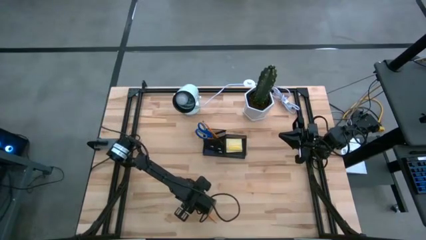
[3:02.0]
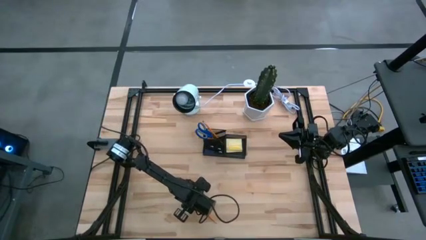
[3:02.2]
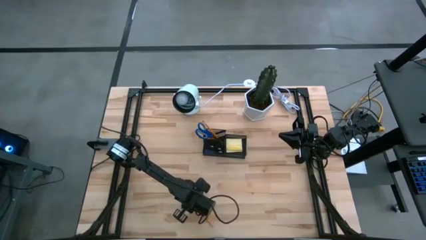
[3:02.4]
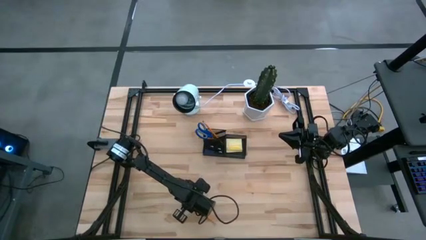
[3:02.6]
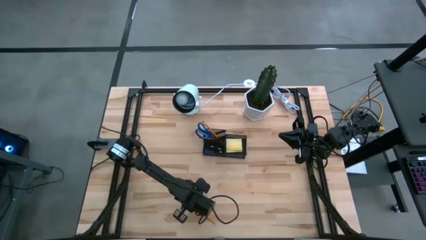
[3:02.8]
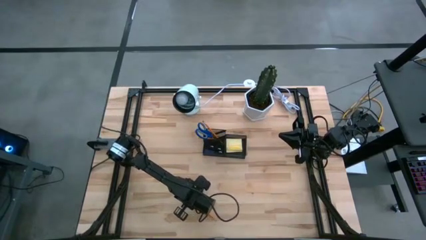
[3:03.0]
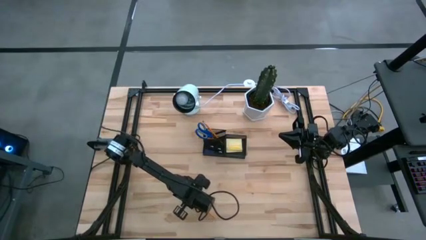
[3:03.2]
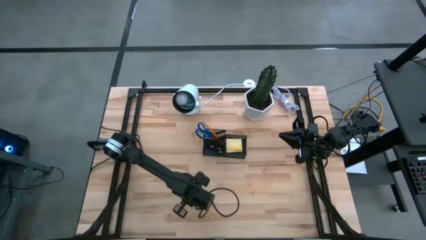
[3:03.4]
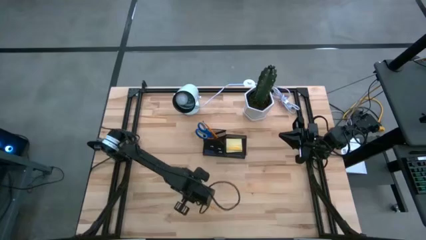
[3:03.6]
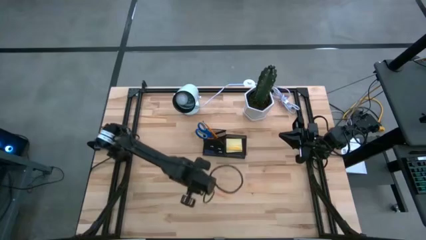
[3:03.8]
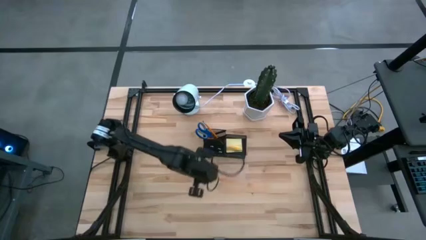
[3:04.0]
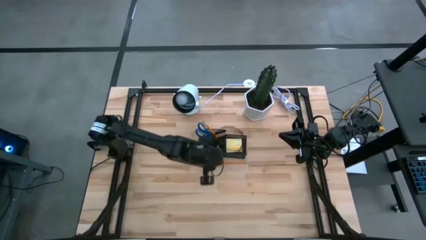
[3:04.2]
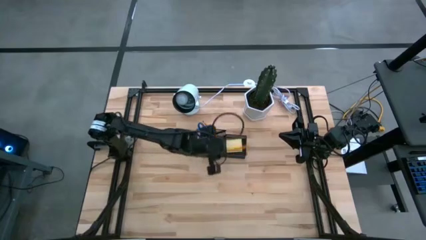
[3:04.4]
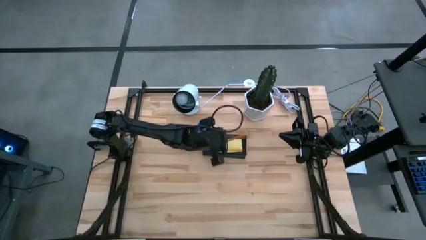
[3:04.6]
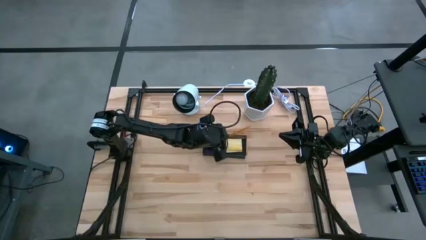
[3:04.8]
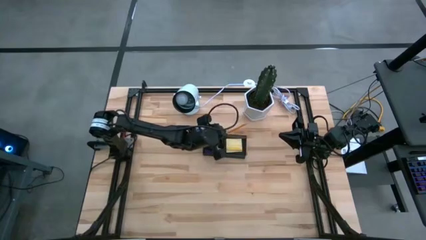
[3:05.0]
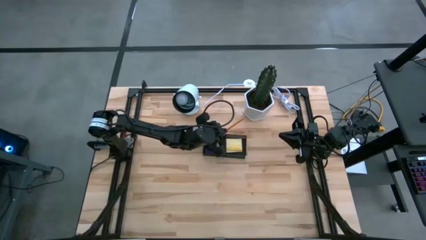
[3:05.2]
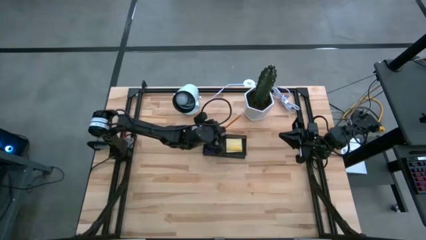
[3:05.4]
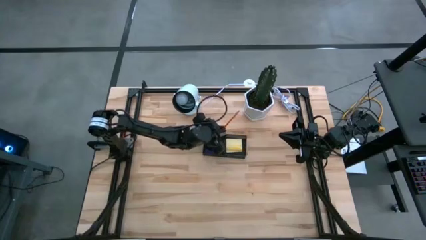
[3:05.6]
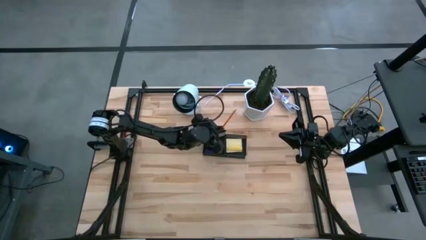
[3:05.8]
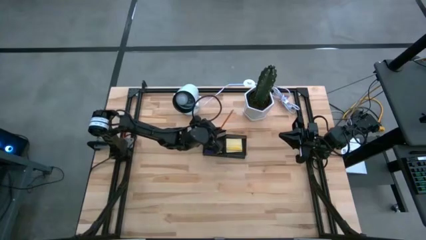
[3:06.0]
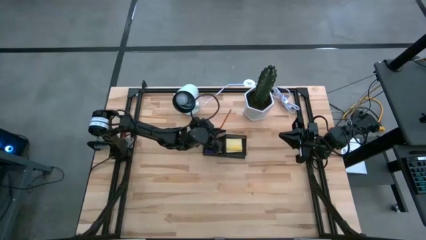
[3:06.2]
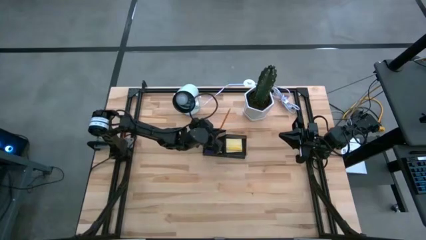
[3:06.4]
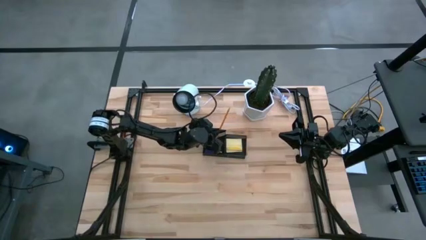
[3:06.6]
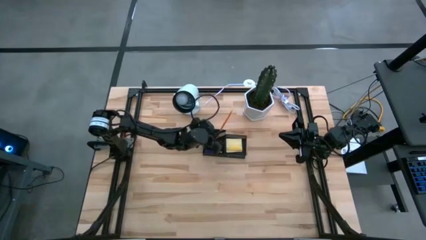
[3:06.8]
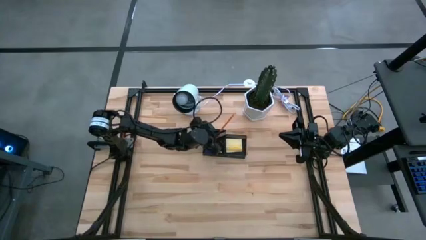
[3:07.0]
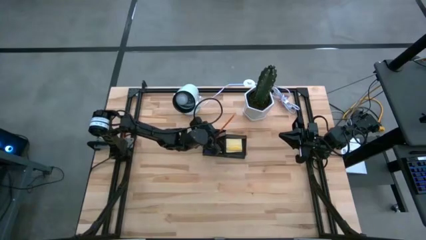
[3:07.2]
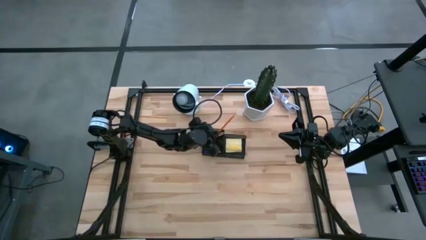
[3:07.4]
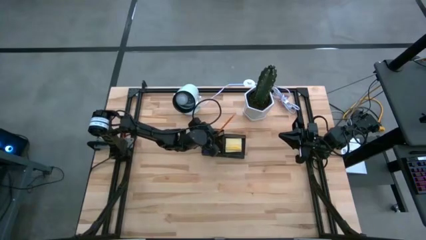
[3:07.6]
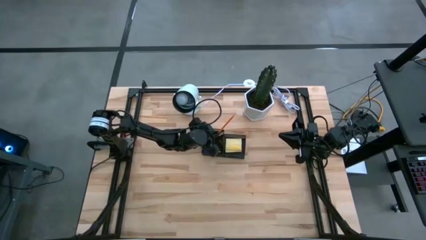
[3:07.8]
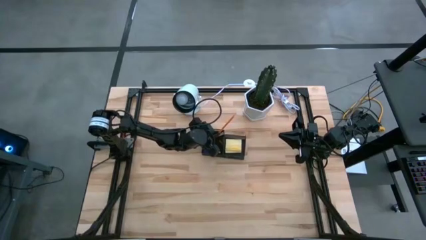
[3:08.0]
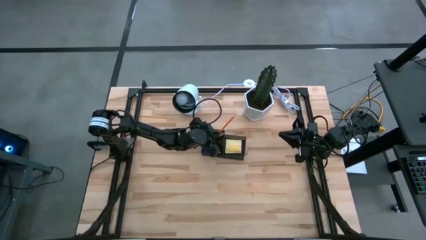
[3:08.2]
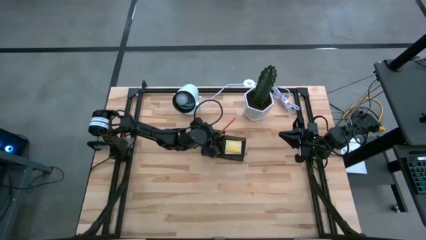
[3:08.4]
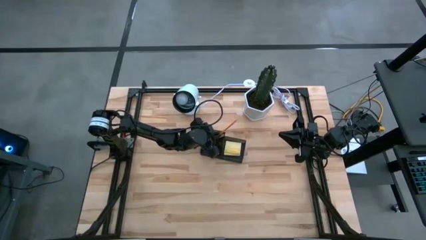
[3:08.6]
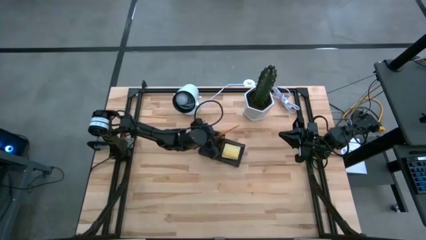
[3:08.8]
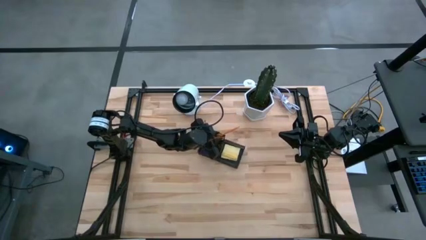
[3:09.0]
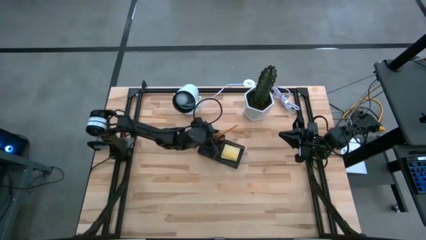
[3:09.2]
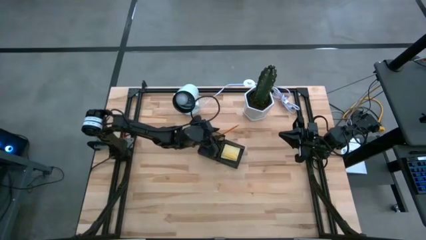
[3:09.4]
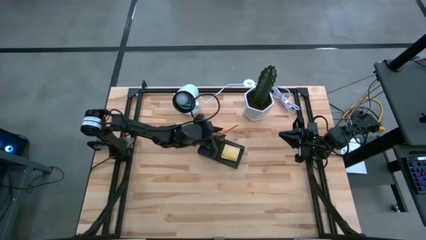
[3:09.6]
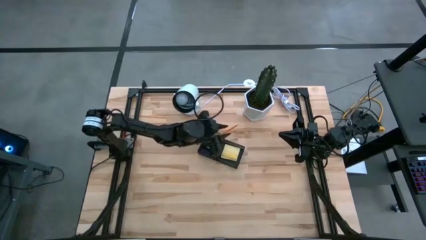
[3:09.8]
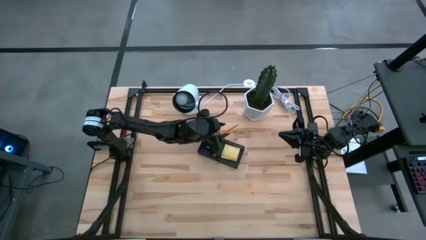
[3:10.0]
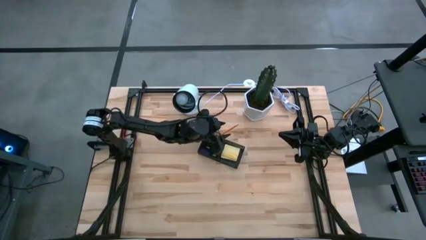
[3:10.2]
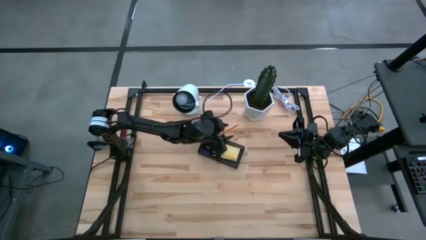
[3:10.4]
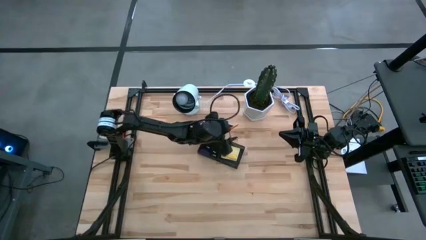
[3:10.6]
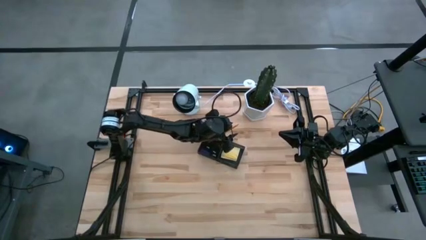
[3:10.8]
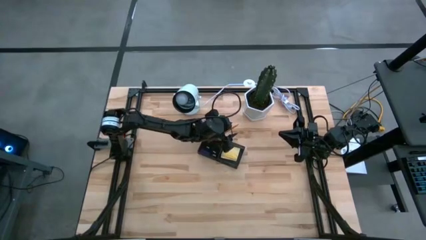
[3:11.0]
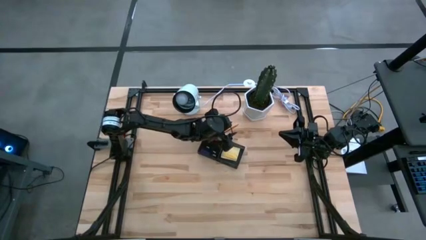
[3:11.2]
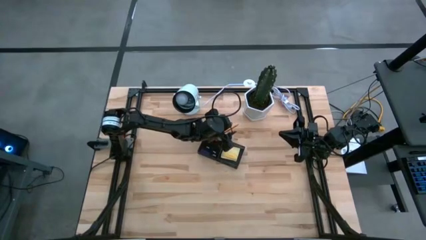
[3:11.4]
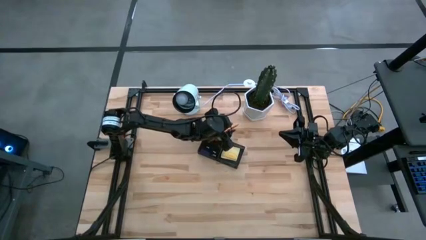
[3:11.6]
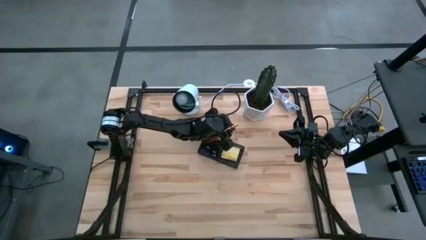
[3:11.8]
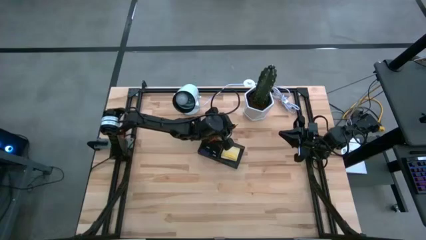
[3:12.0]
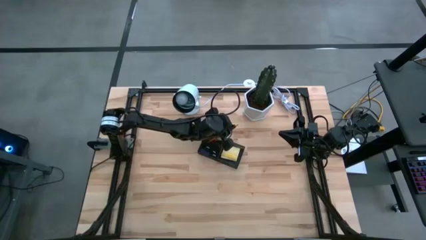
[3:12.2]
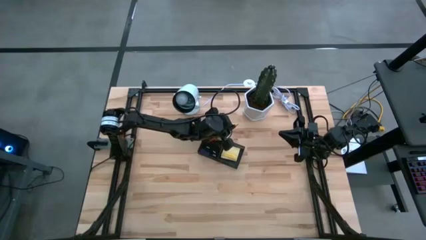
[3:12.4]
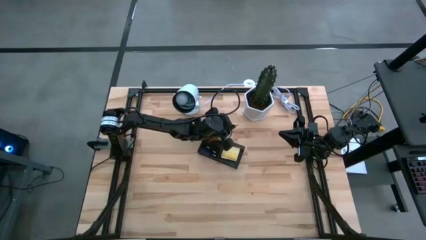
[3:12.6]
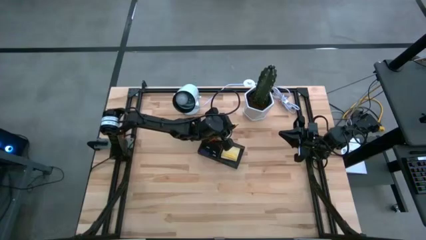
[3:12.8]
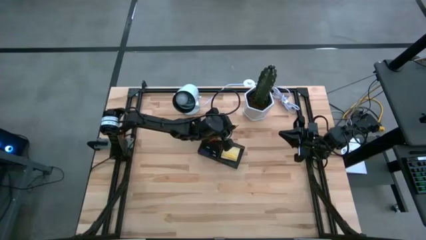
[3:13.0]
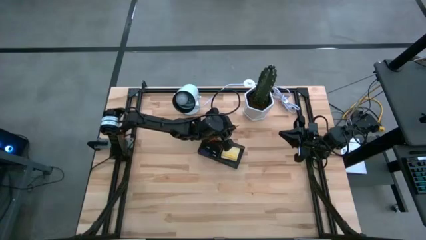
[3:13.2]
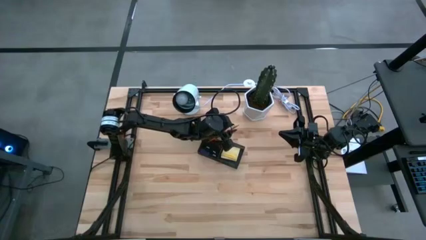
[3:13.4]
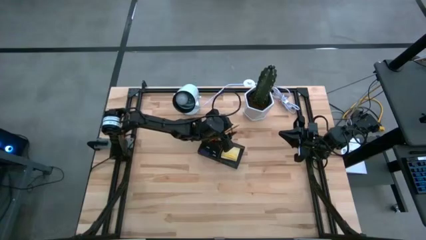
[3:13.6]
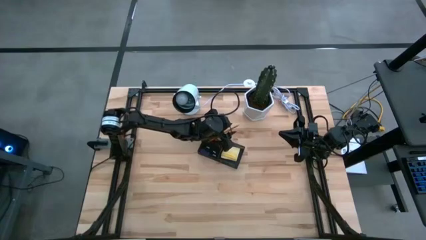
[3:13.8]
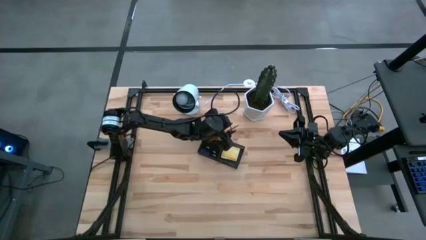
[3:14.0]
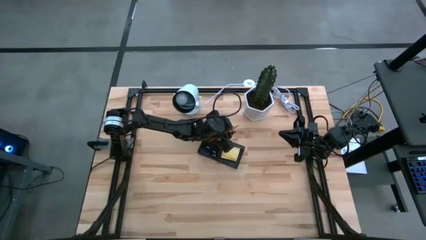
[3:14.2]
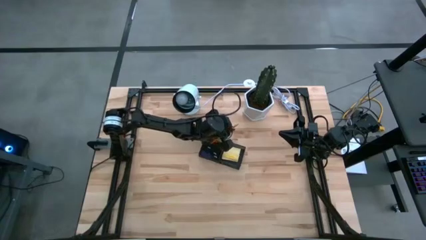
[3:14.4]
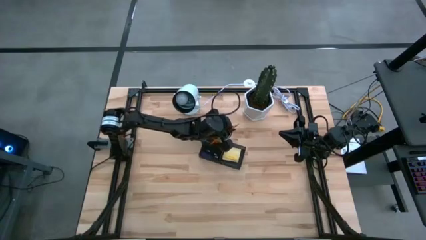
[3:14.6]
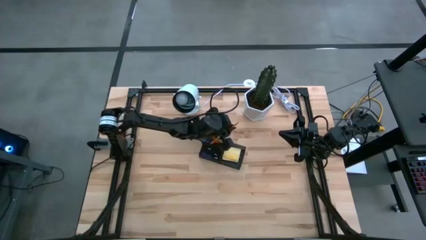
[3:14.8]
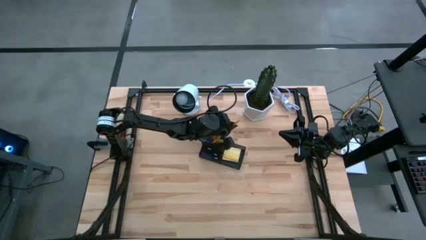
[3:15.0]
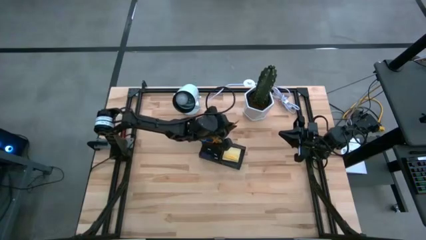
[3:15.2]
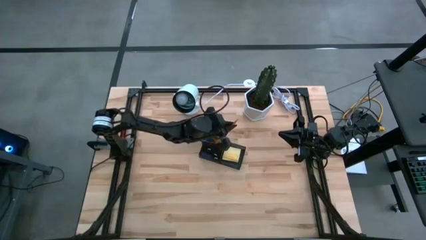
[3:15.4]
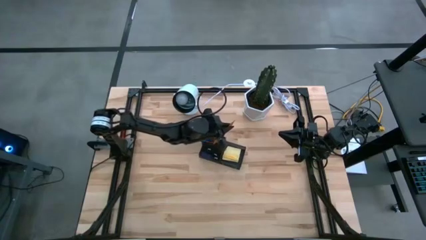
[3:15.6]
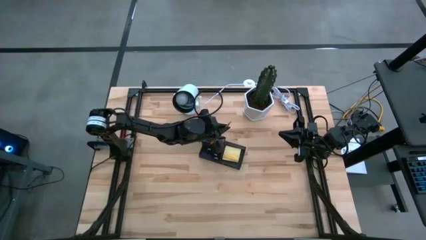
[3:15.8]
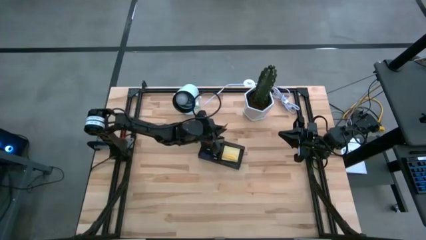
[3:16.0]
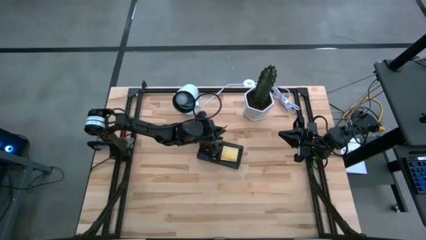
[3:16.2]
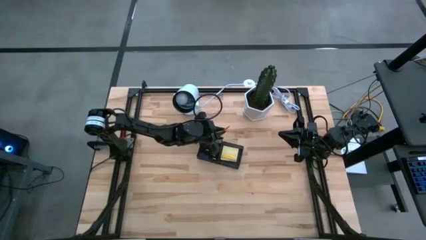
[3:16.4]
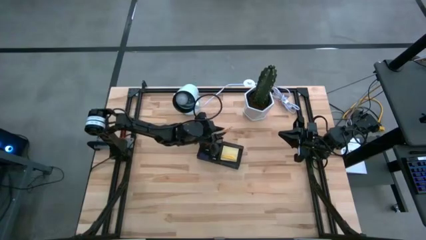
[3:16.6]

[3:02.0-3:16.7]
Task: Pick and place office supplies into organizer
Put the yellow pencil into the black desk organizer
